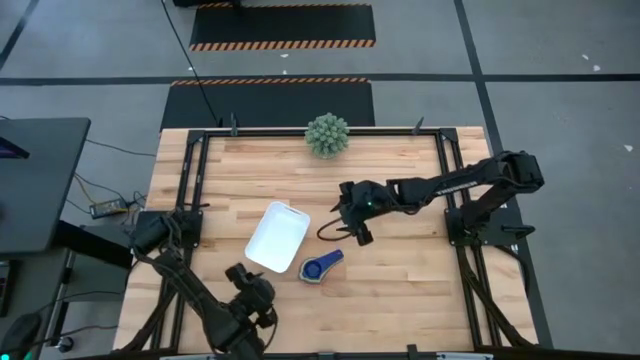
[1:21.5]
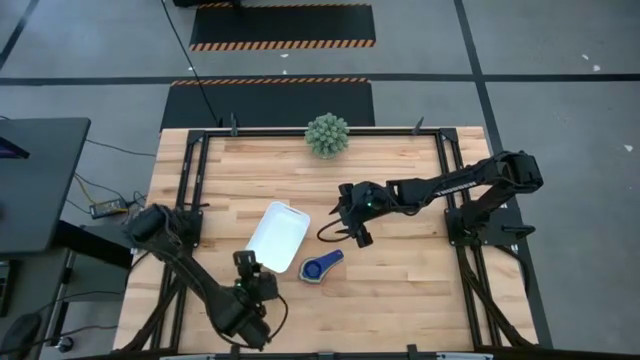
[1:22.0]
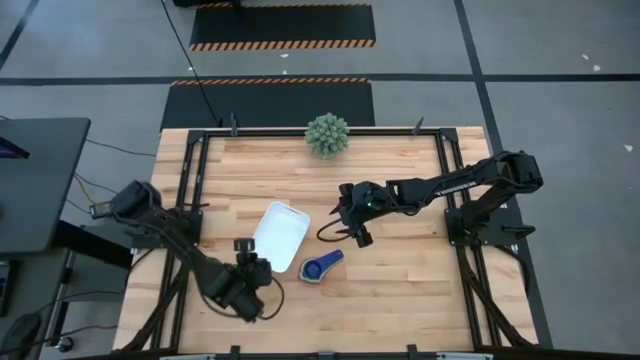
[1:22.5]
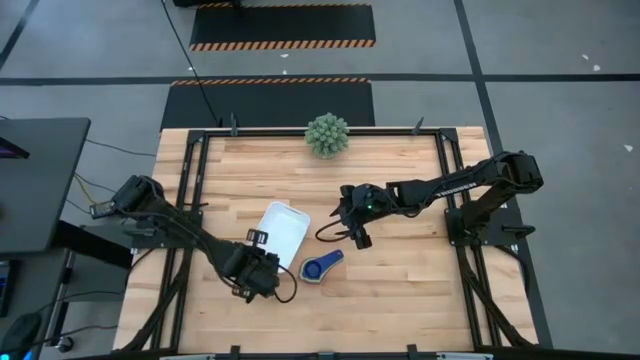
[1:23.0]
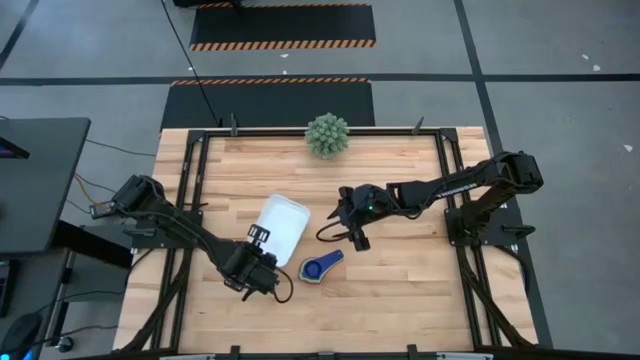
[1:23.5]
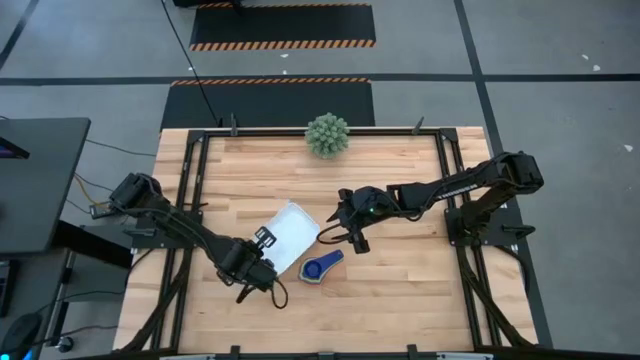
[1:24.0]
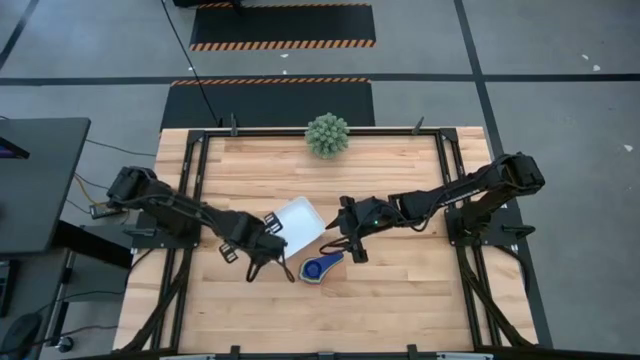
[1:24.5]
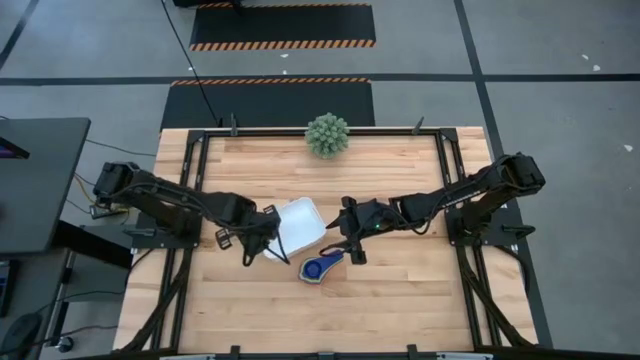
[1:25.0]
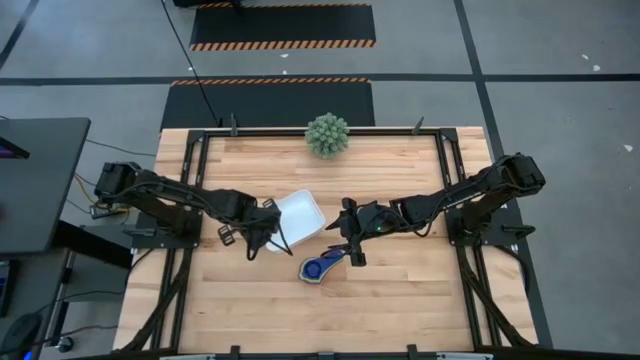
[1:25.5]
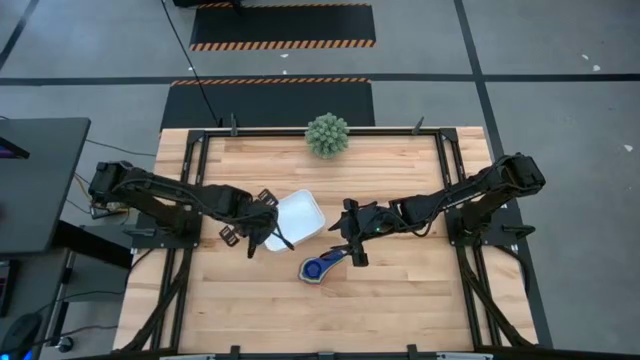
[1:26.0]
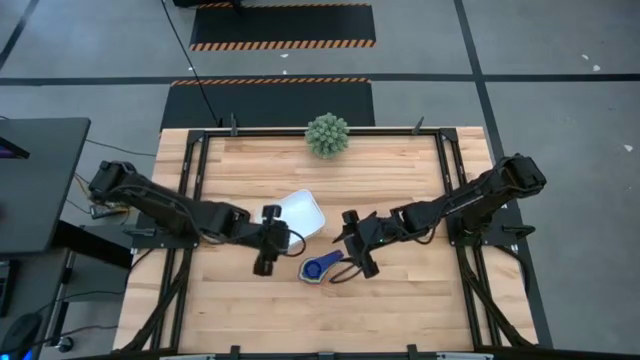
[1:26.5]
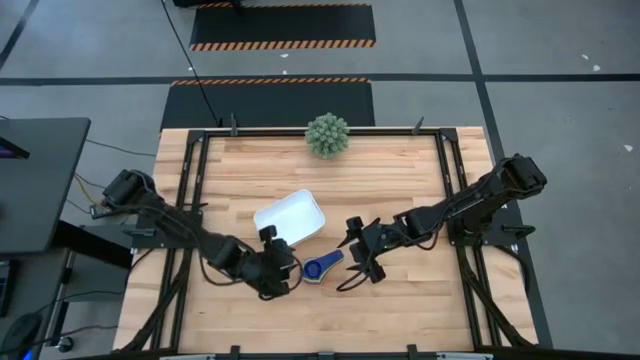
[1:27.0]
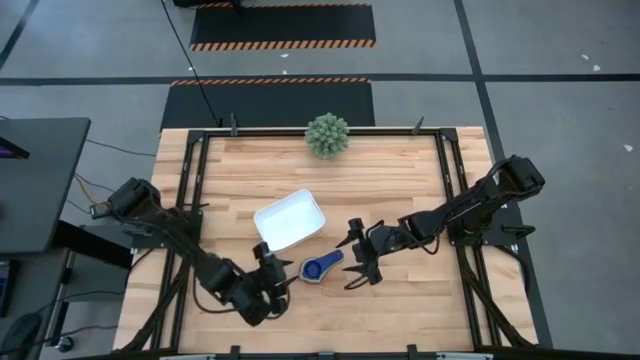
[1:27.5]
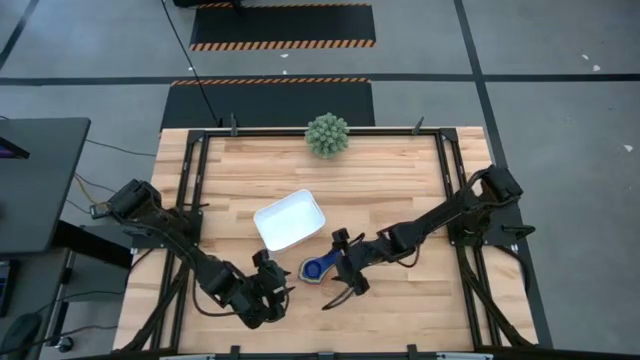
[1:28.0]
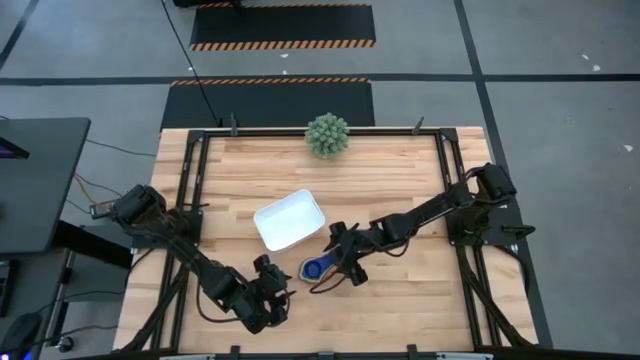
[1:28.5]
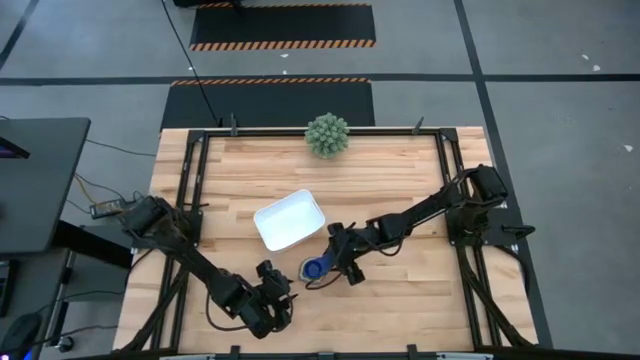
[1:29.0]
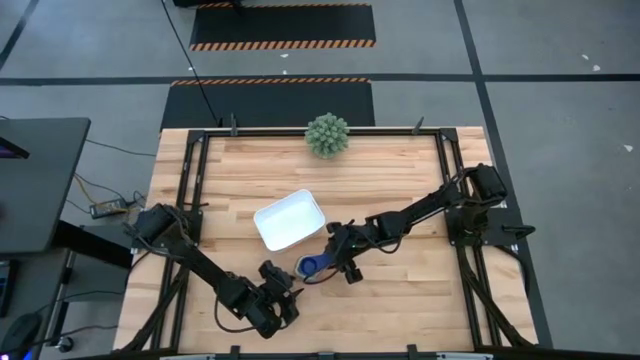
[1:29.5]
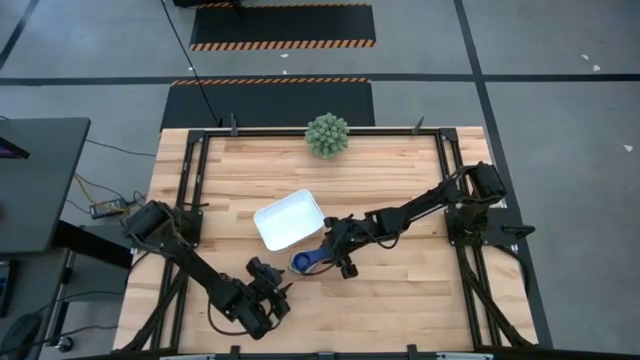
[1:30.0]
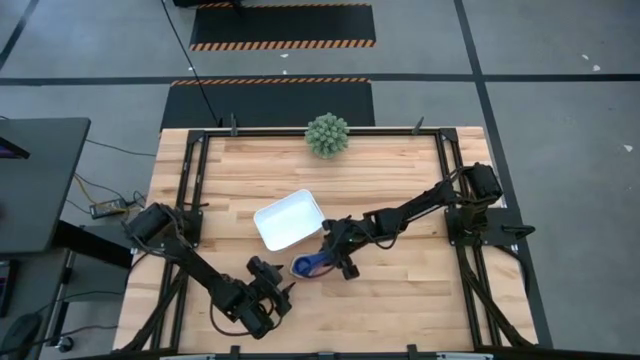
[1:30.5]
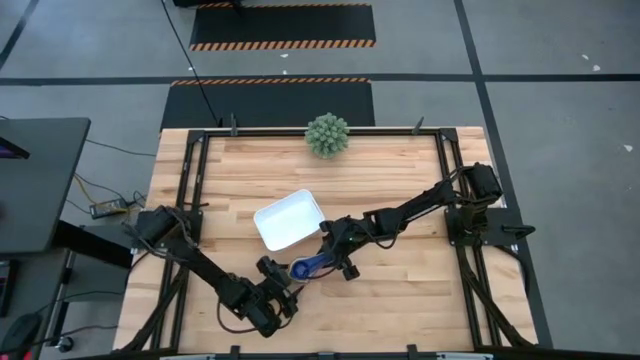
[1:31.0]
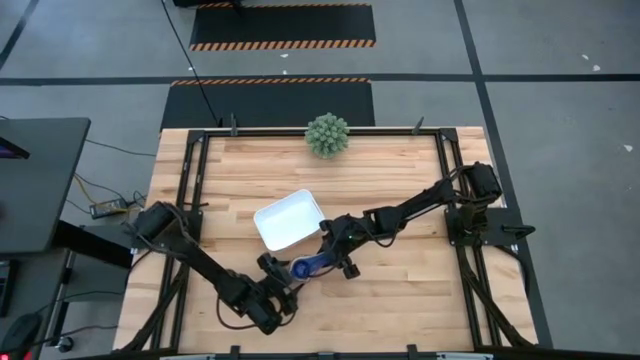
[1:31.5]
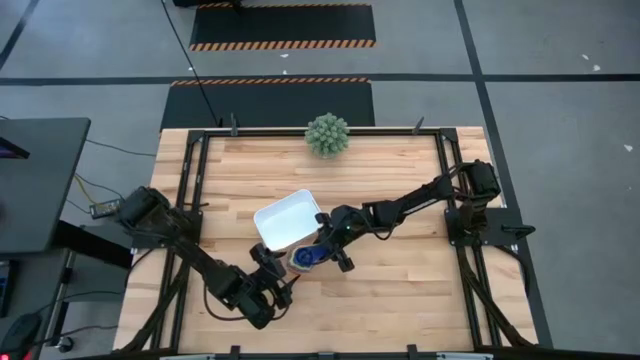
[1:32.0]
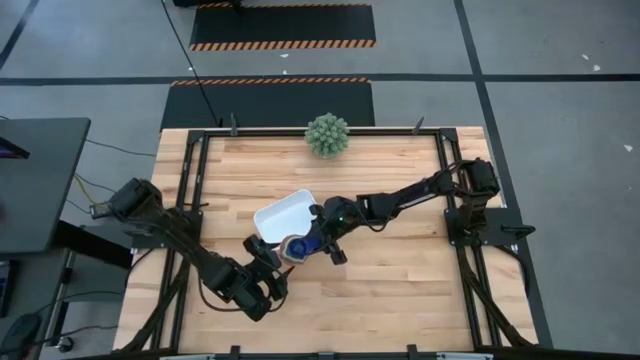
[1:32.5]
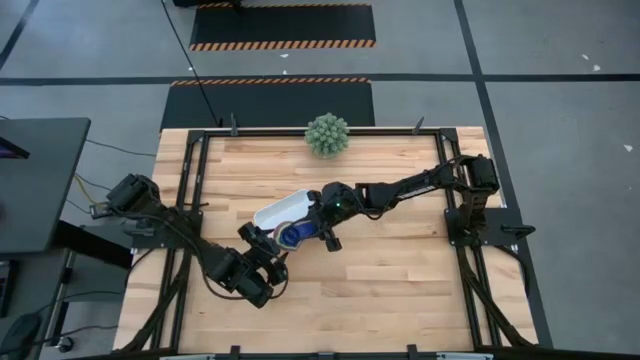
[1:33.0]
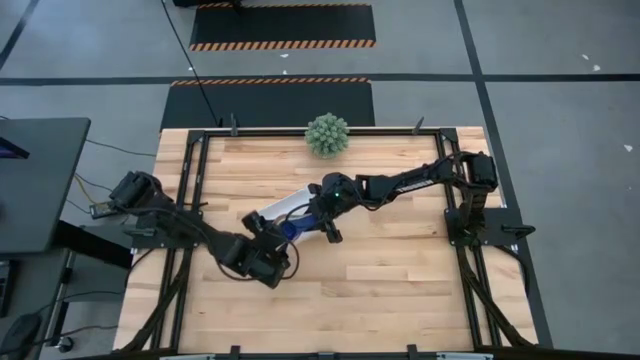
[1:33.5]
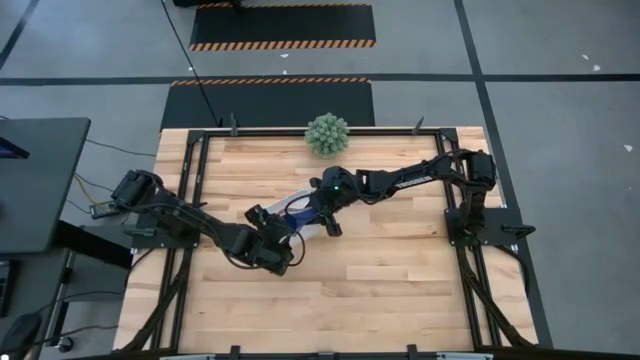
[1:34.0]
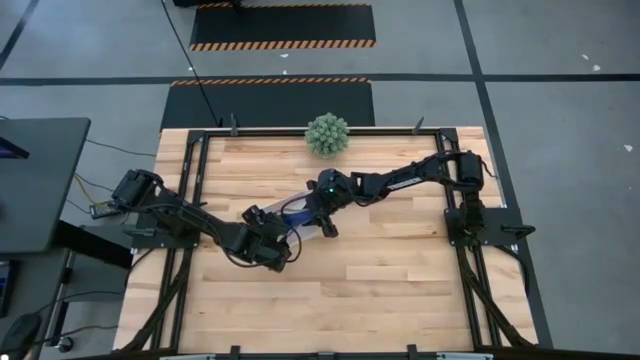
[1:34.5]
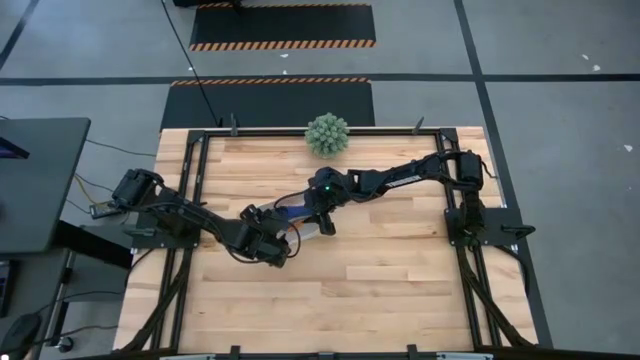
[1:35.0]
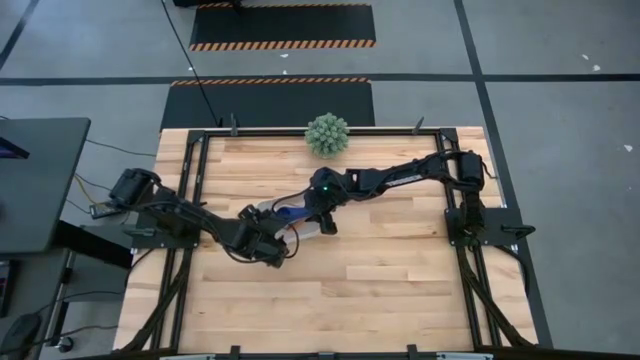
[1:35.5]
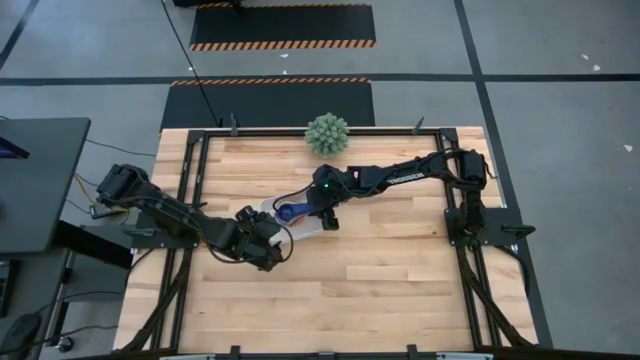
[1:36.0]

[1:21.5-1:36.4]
Task: Nest measuring cups in basket
Put the nested measuring cup into the white bin

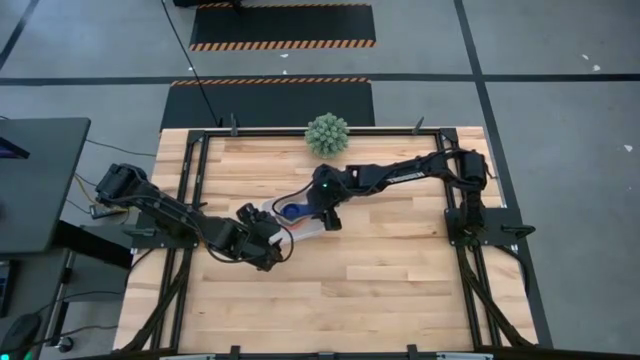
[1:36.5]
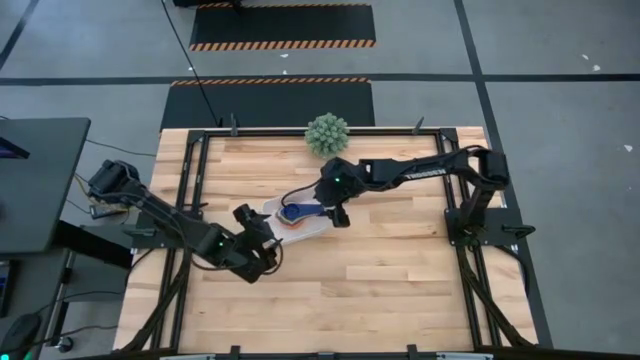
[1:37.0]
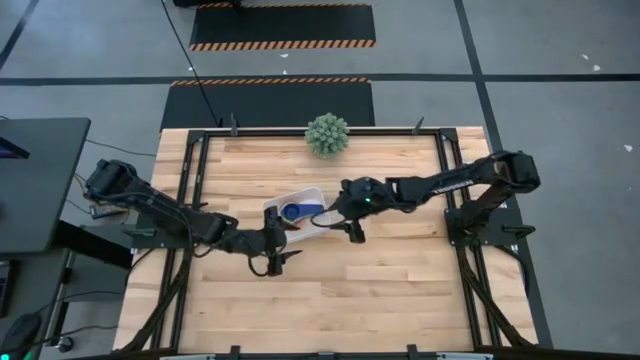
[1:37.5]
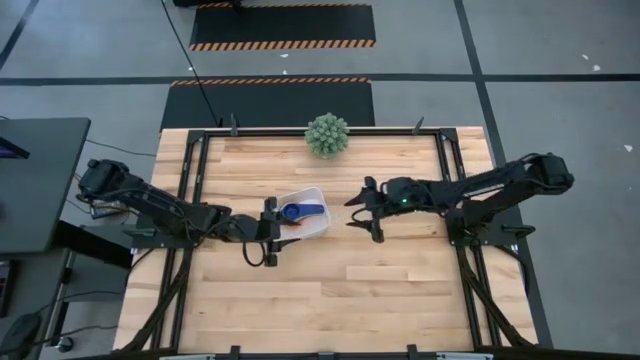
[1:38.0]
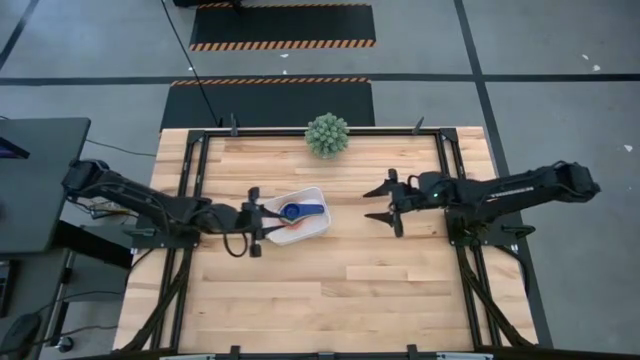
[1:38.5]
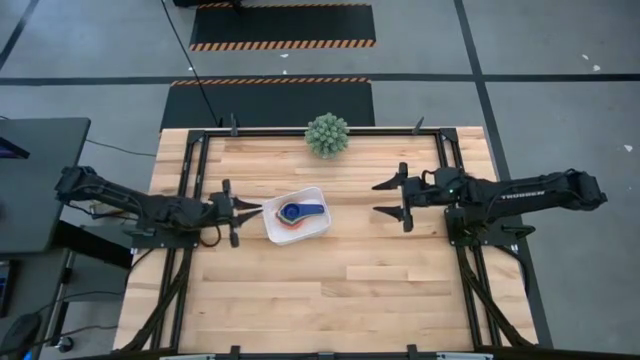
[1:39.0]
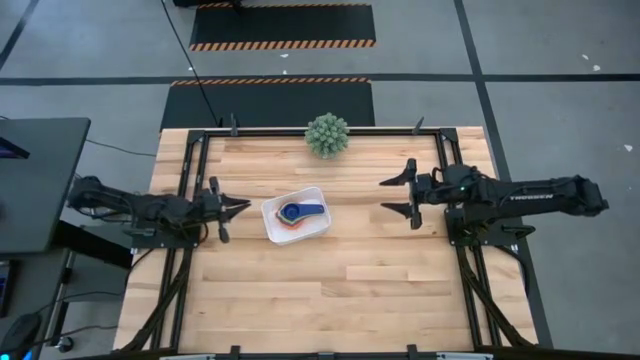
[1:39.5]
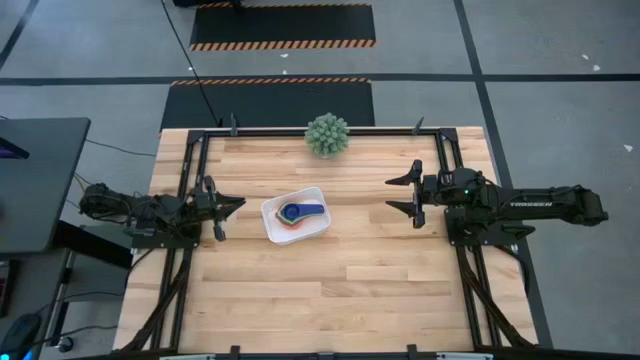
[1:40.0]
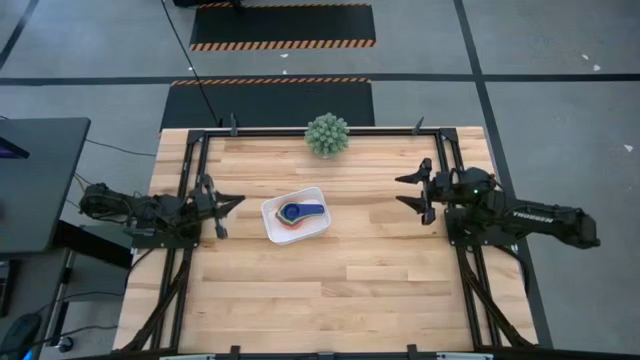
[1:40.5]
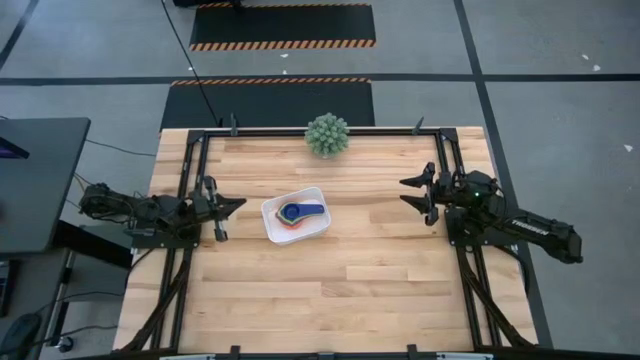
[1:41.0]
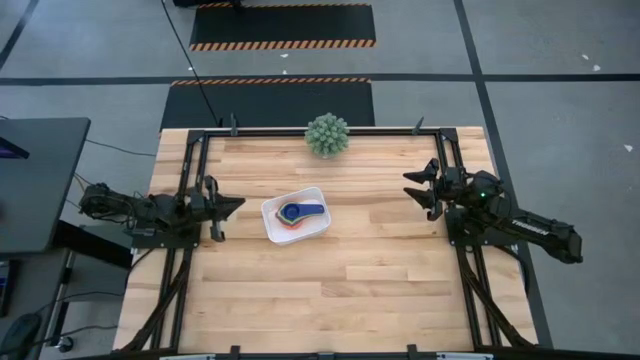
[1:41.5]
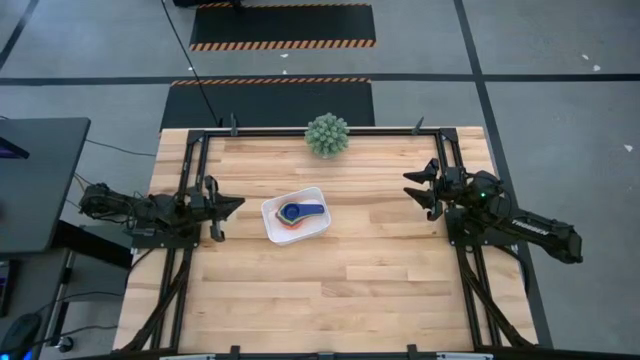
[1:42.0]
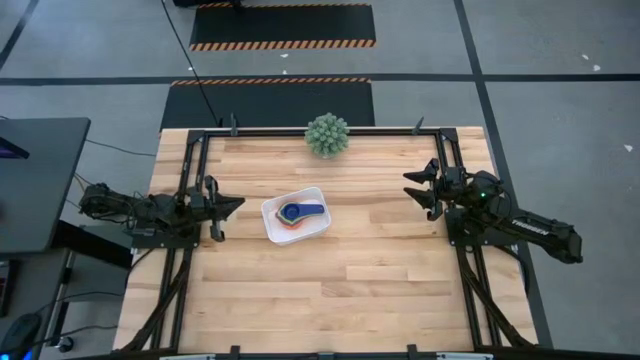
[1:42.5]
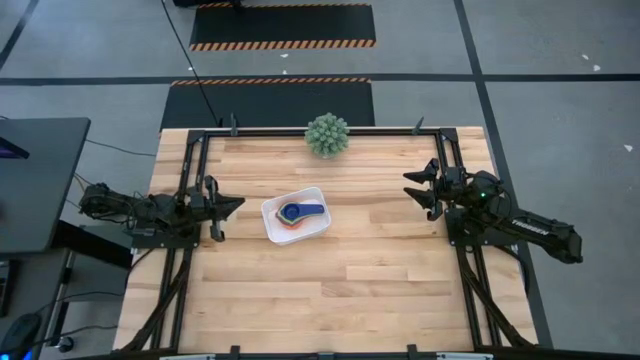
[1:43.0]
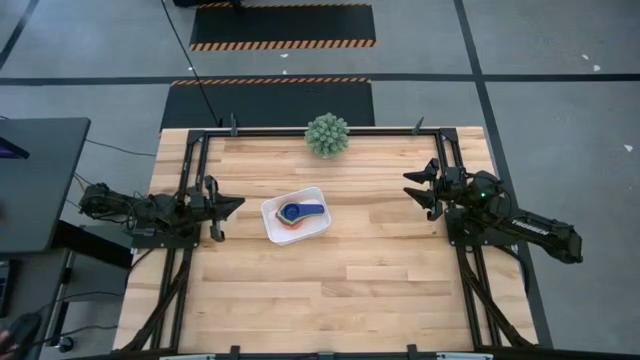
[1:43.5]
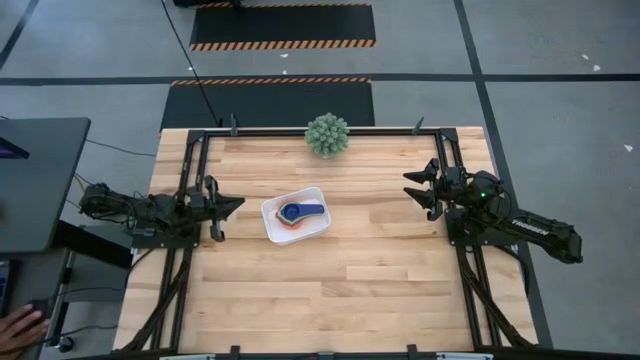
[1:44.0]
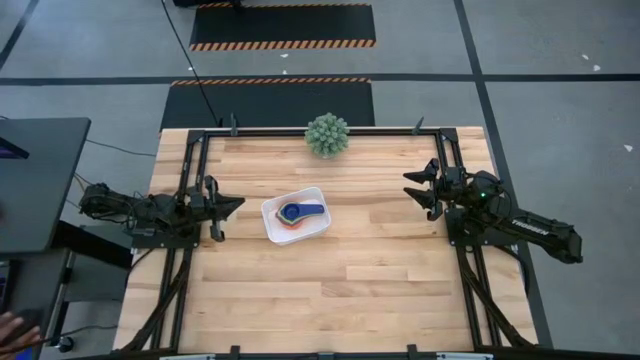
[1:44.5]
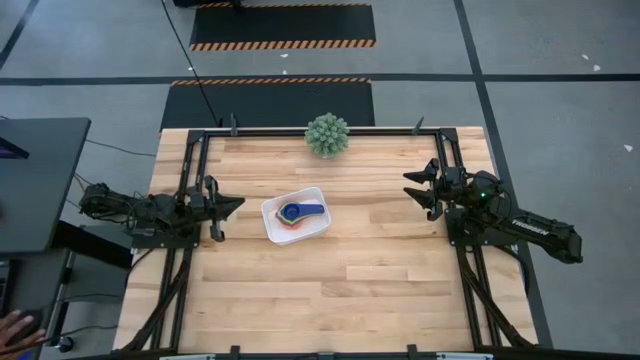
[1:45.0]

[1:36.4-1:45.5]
Return to Home Position
